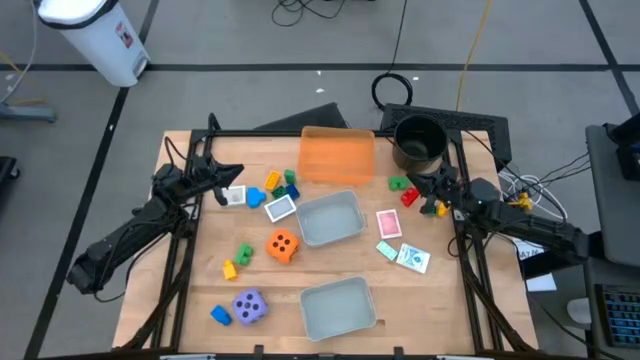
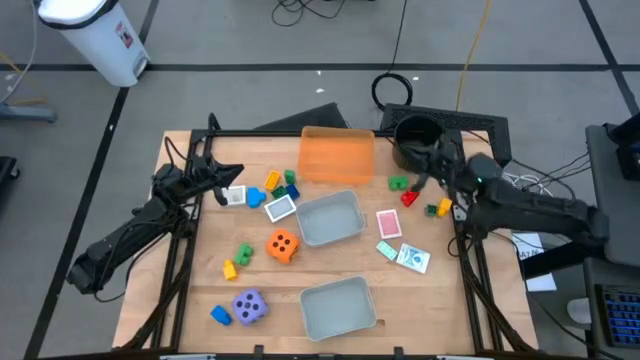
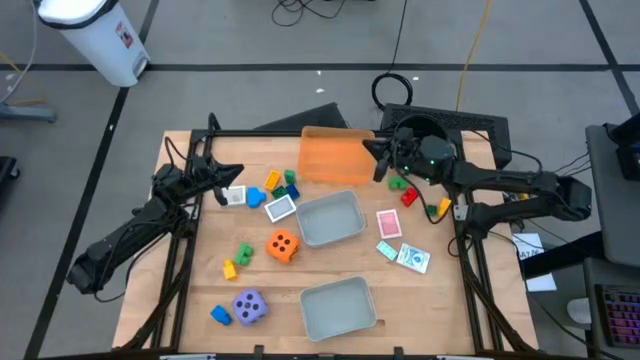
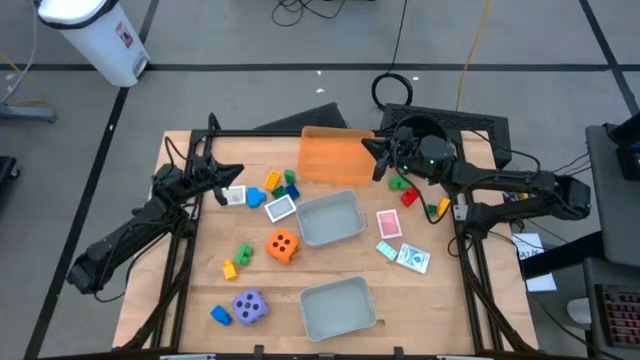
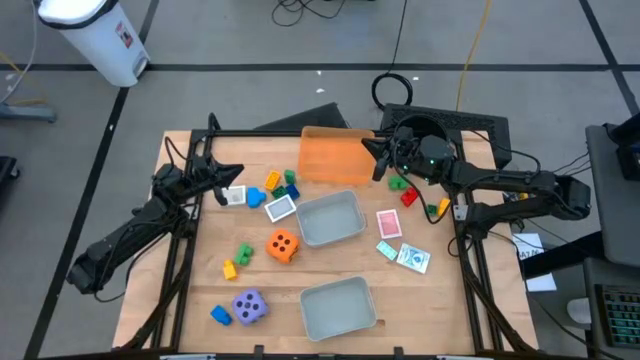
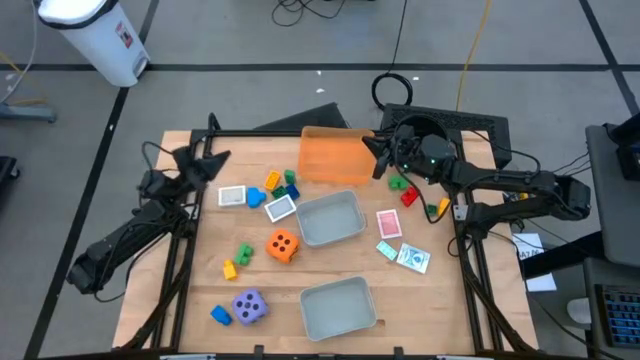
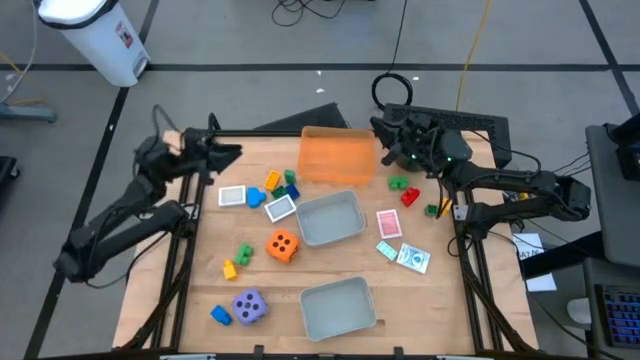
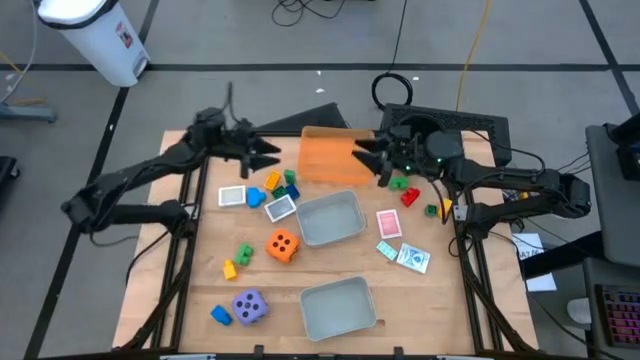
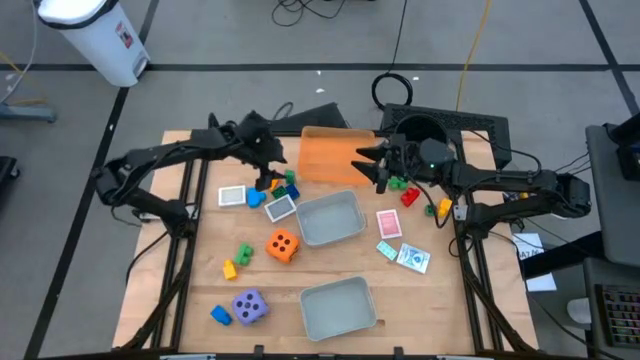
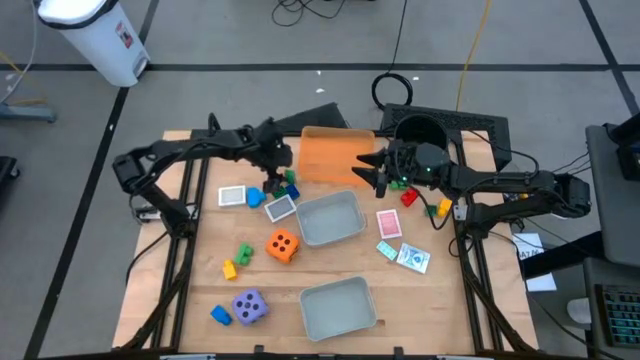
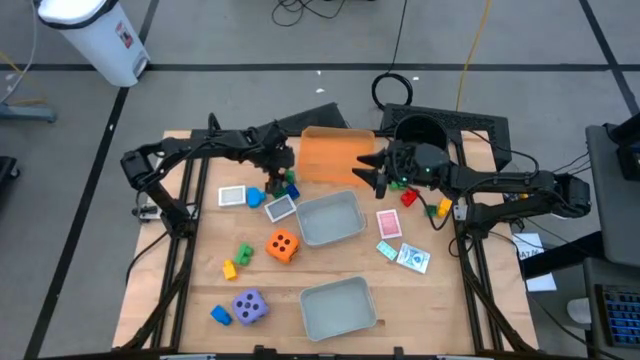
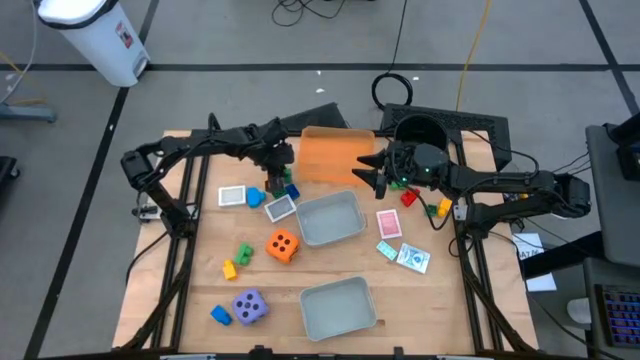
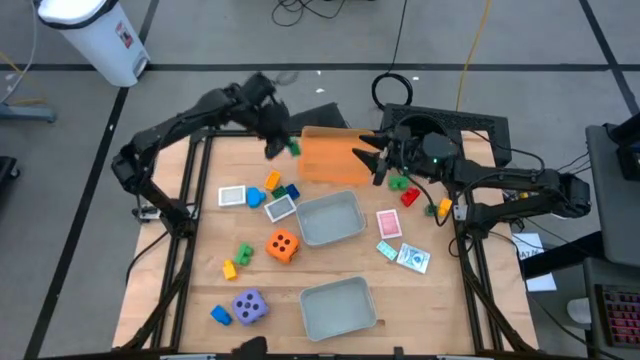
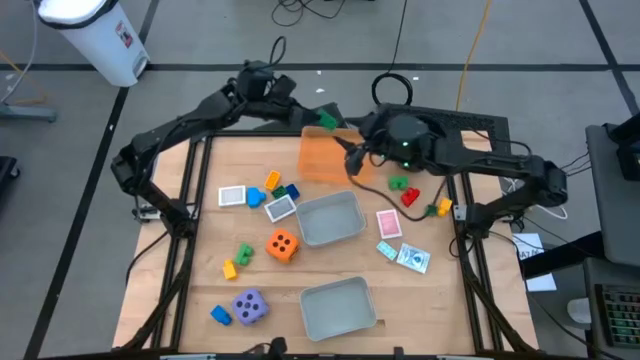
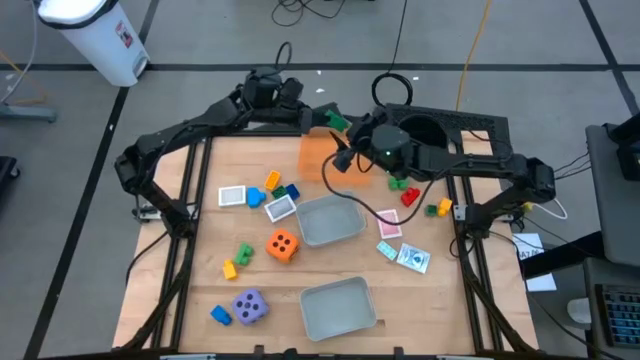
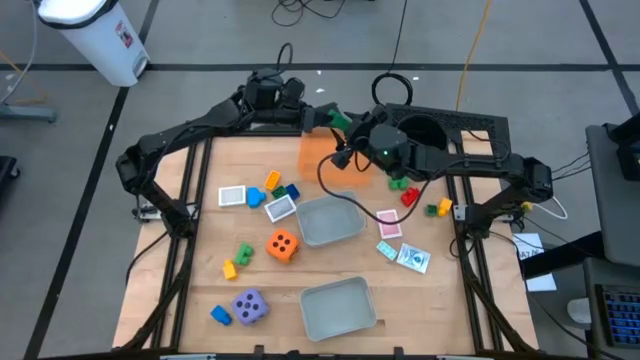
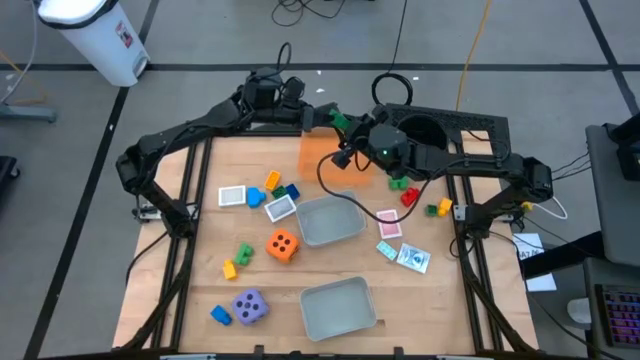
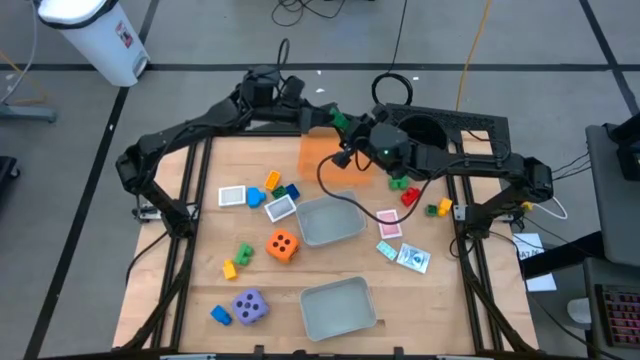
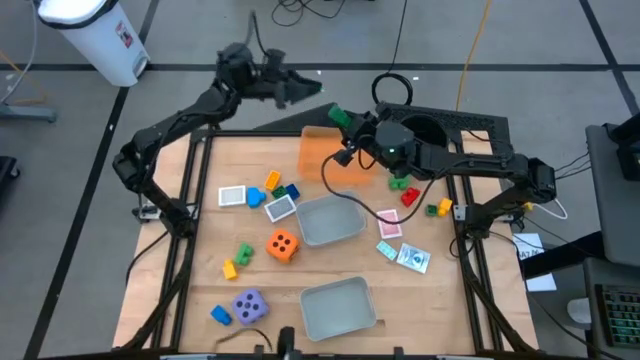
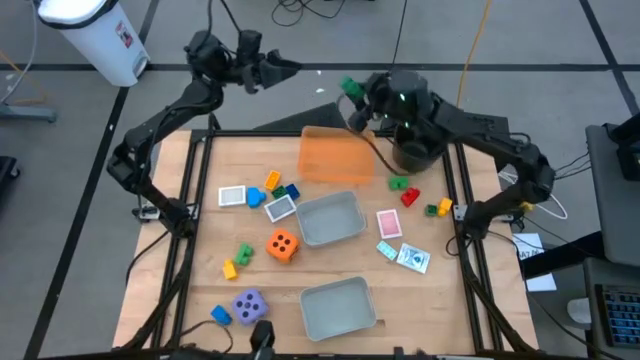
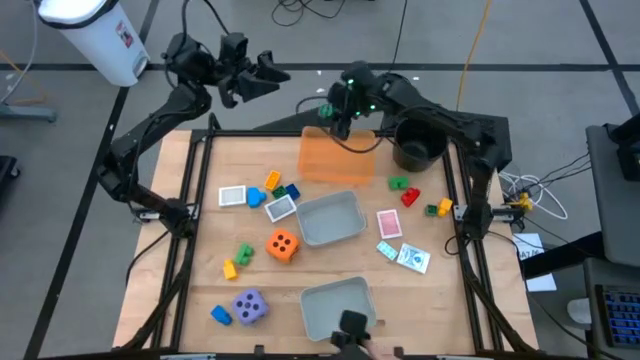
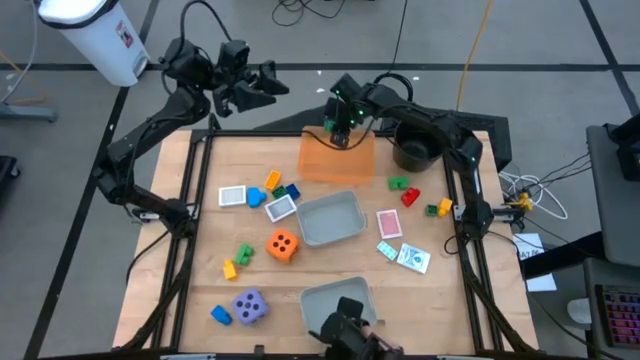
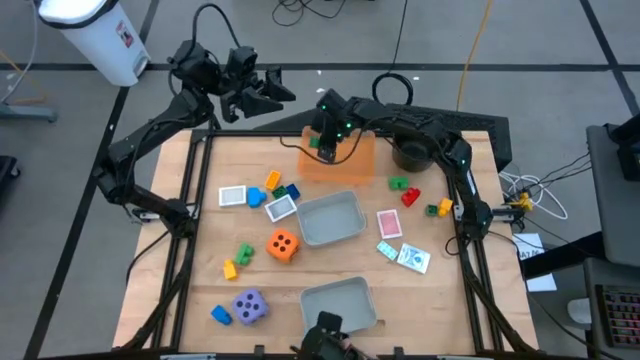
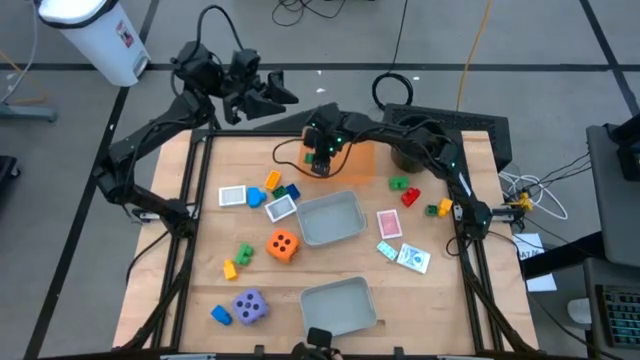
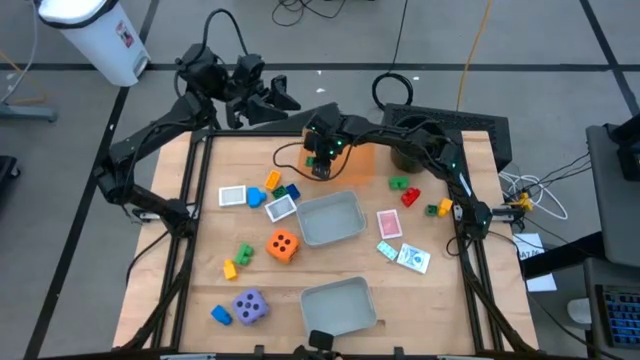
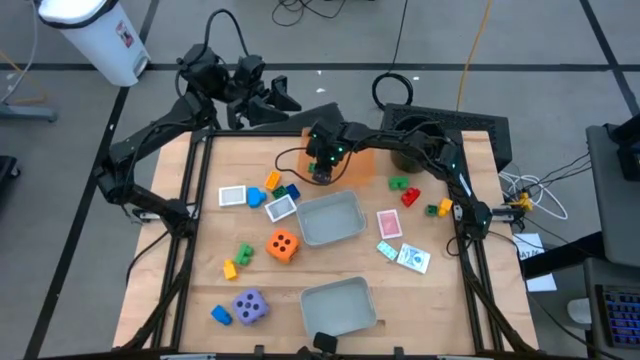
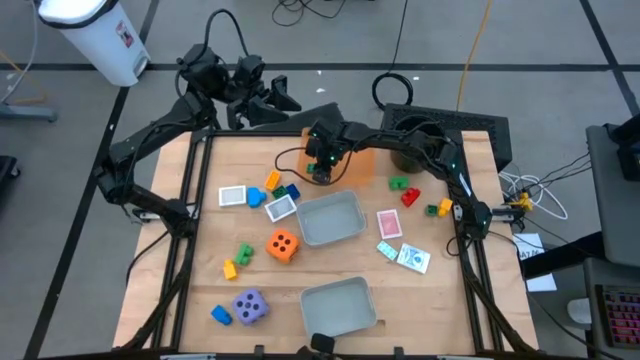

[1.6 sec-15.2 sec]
Task: Pick & Place Toys
Put the green game piece into the orange bin

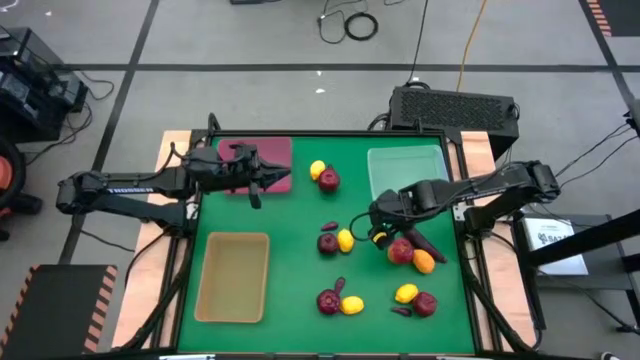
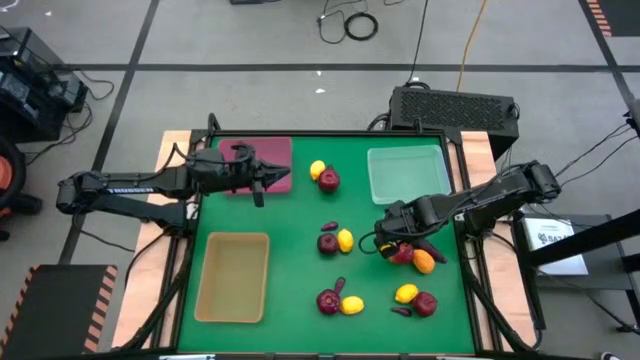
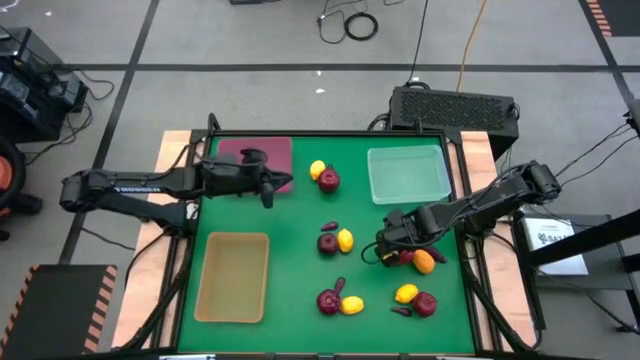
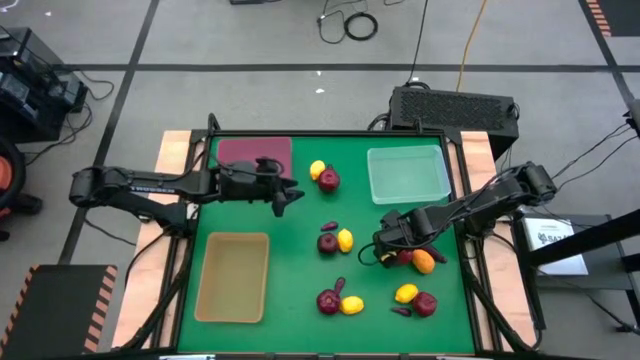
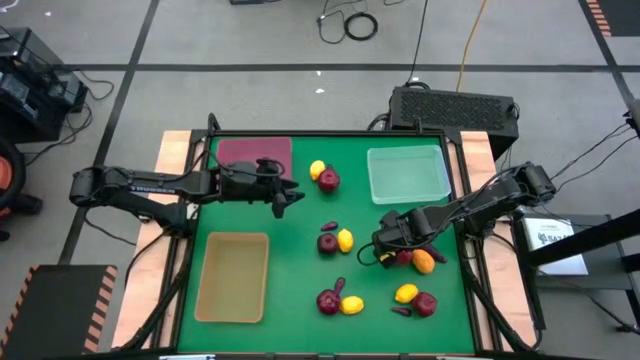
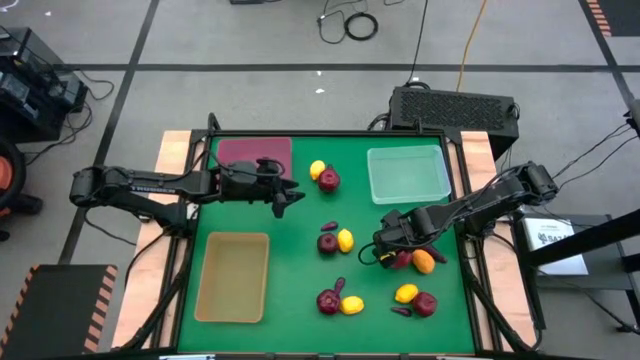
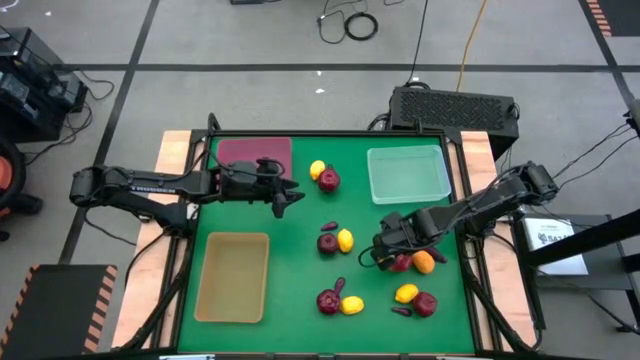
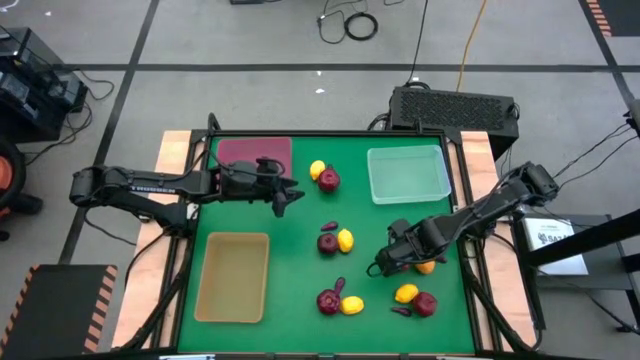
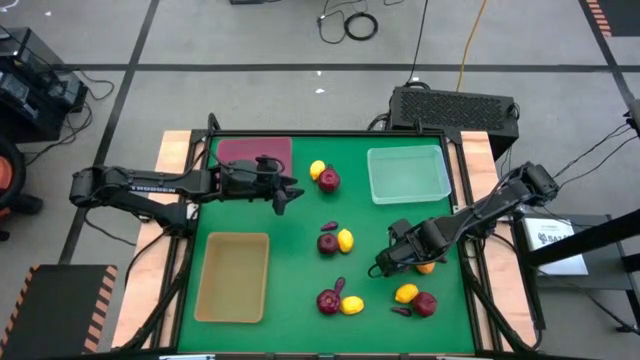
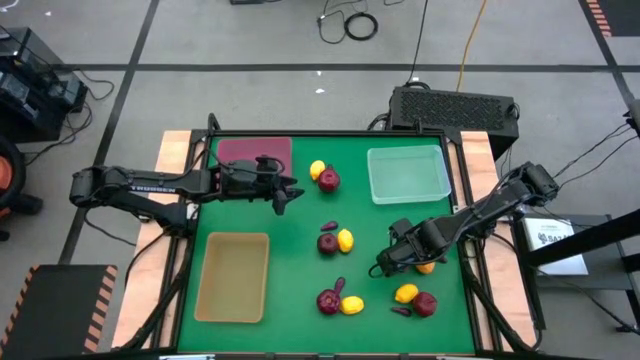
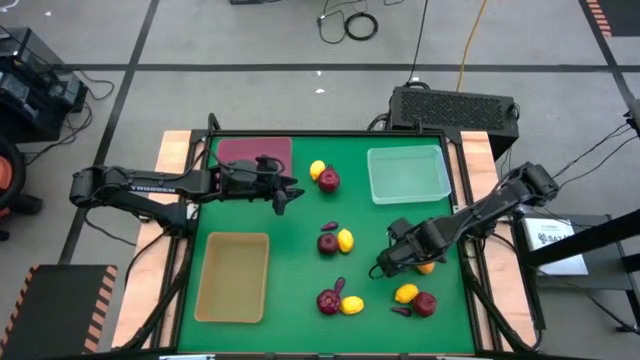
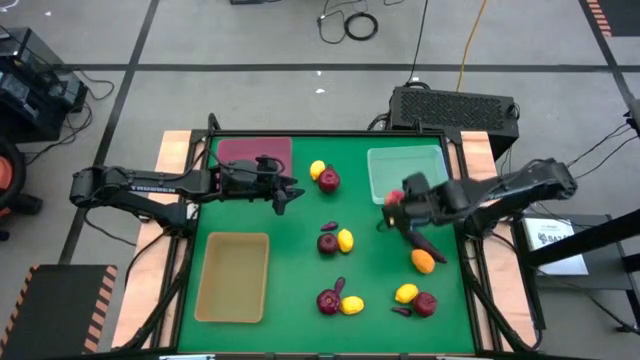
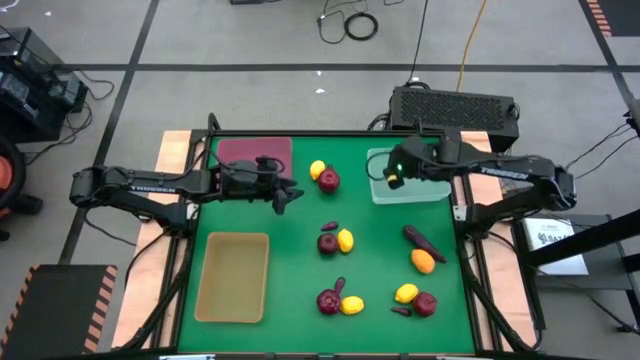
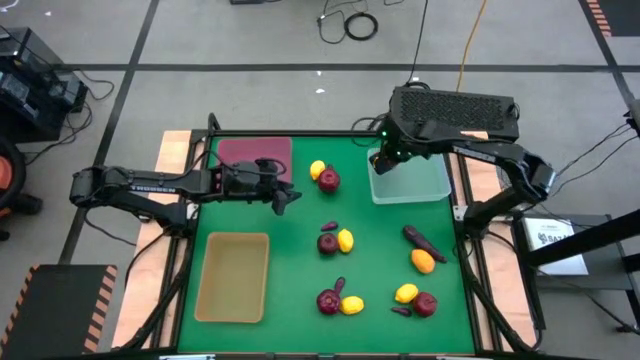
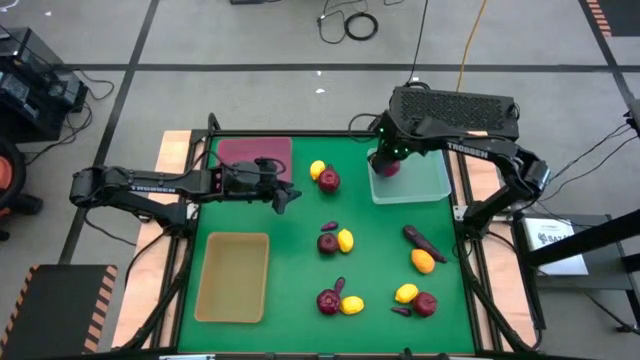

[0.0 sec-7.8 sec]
Task: Sort produce into baskets
Put the apple into the transparent bin
